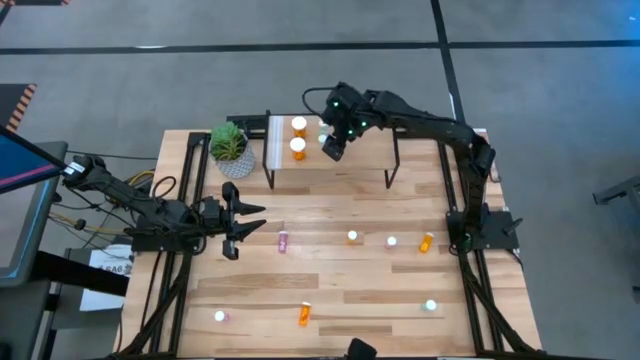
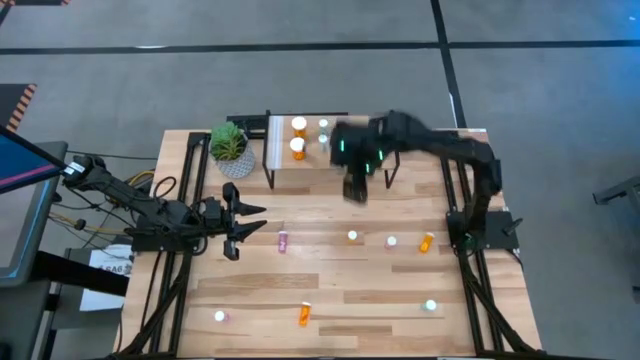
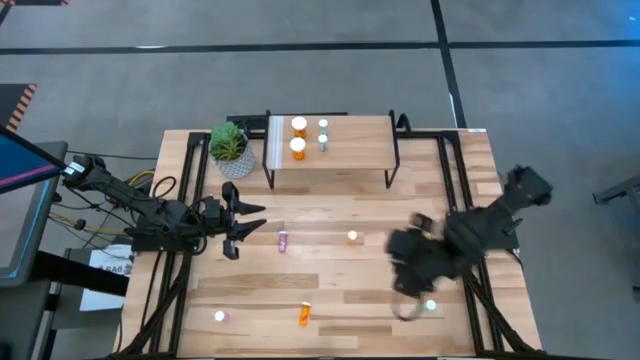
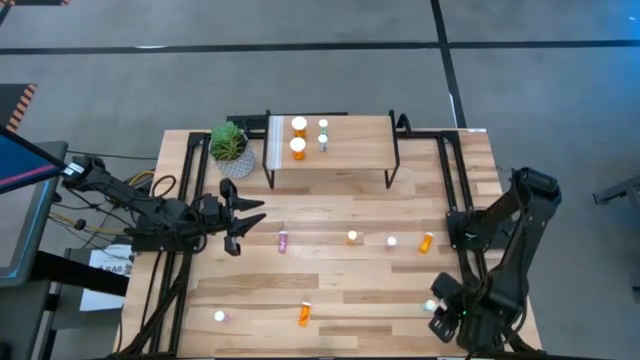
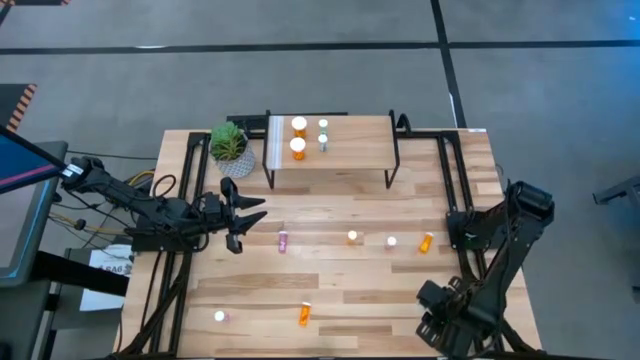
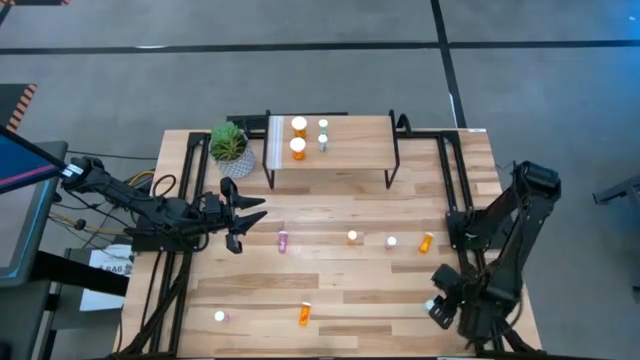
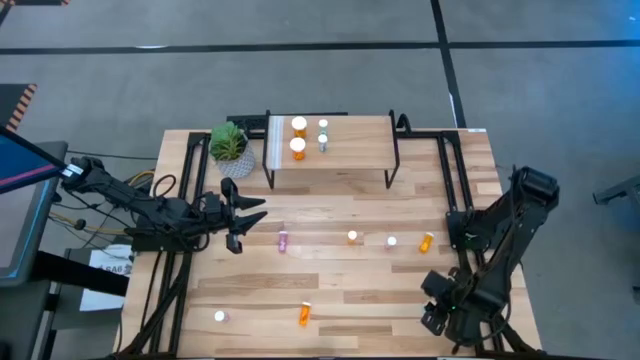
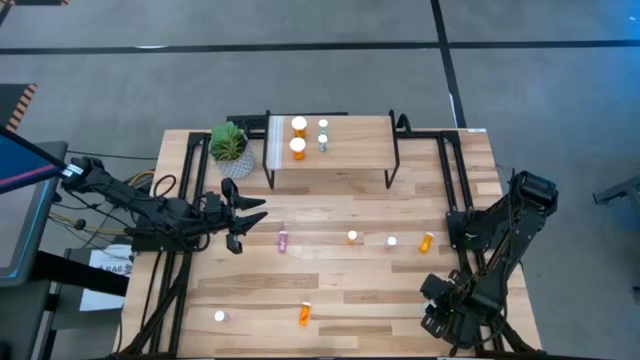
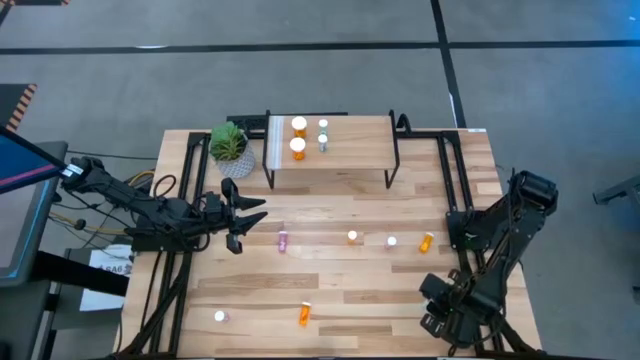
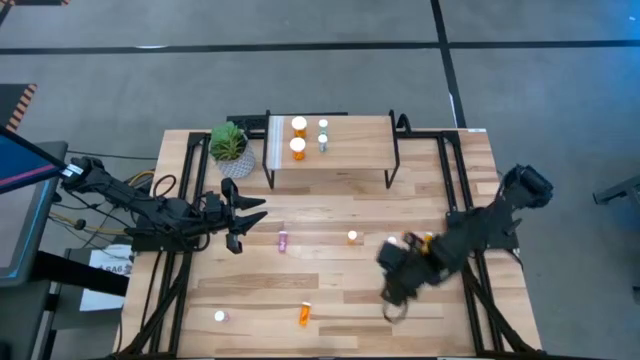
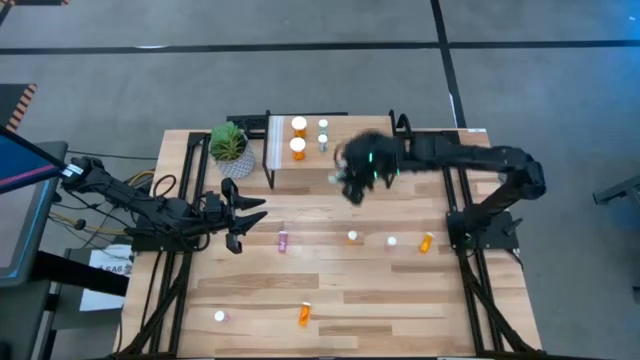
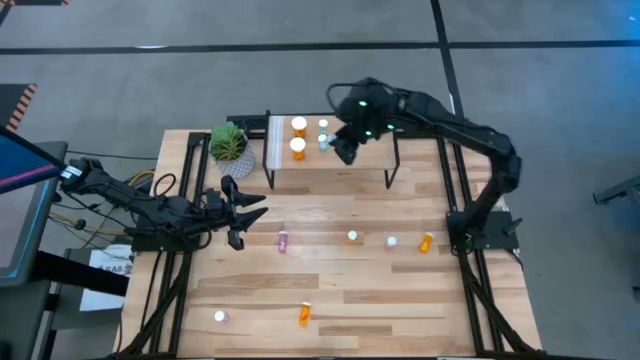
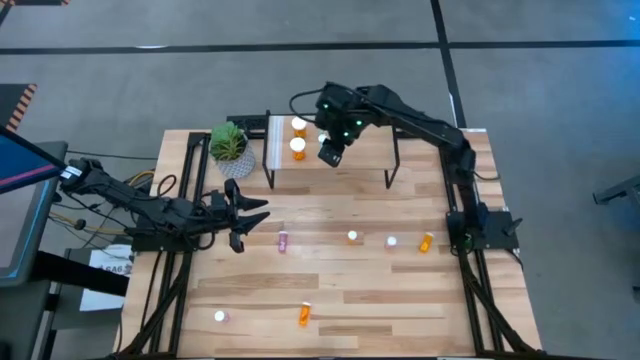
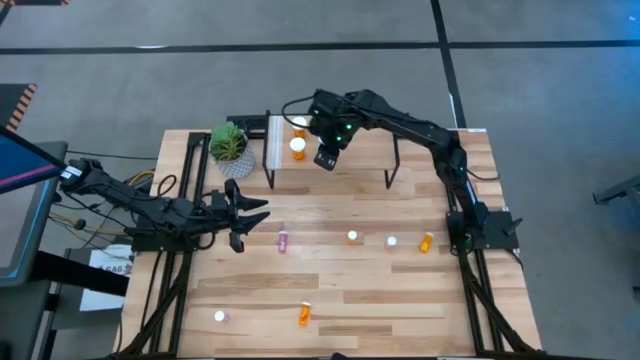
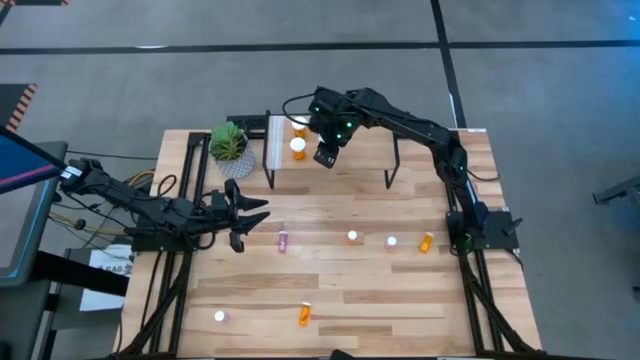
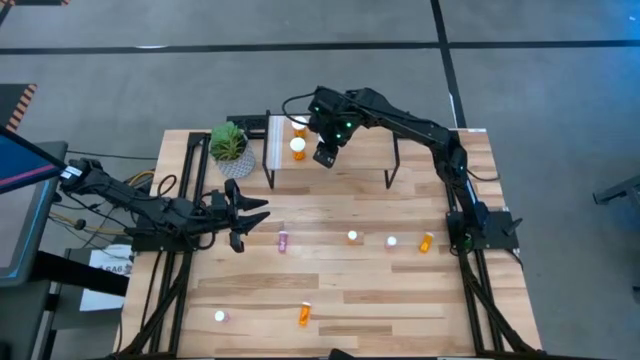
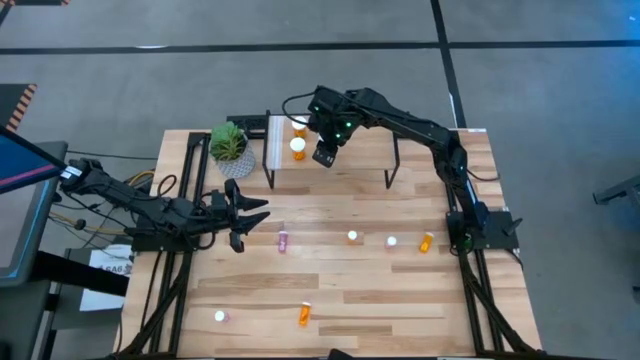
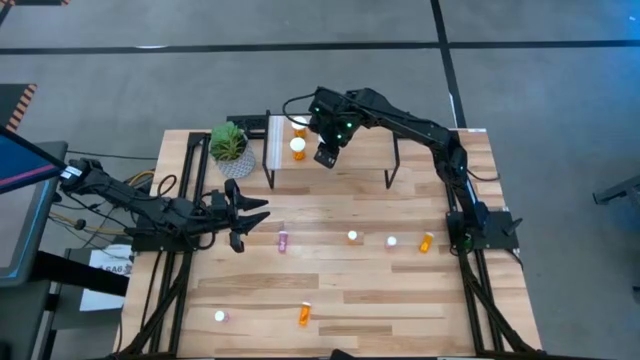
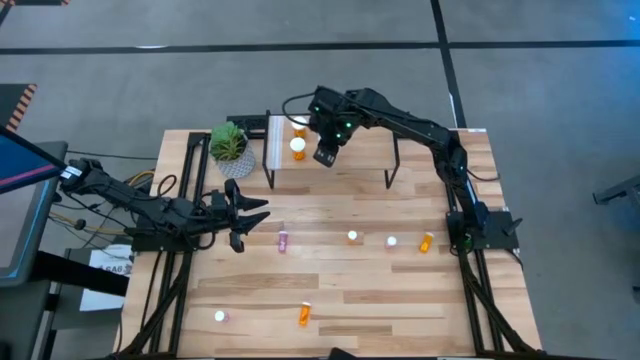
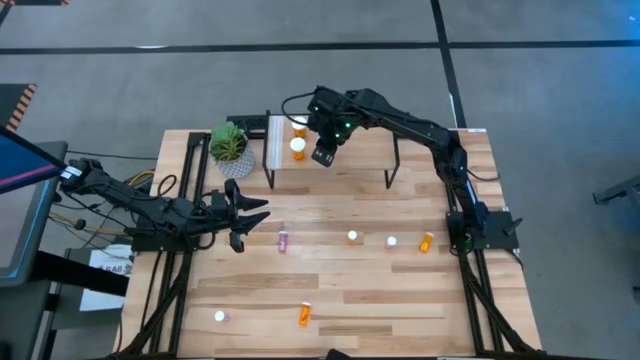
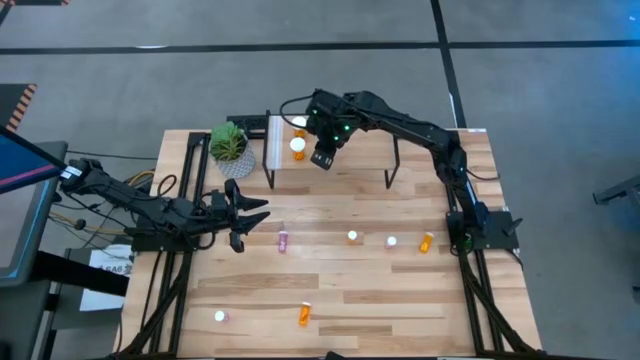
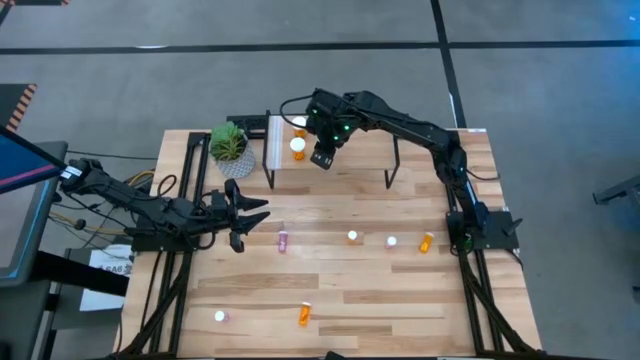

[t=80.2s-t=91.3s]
Task: Pick and place medicine bottles onto shelf by color
Put the blue pill bottle on the shelf aligned with the other blue pill bottles

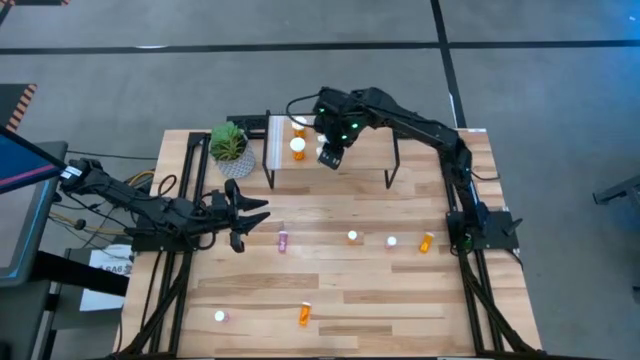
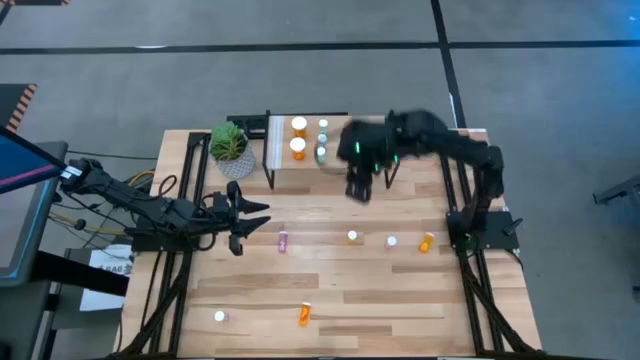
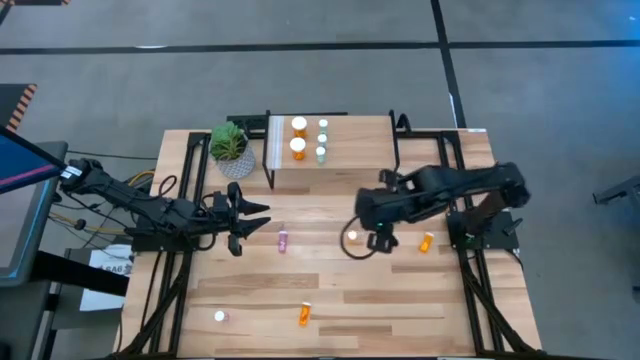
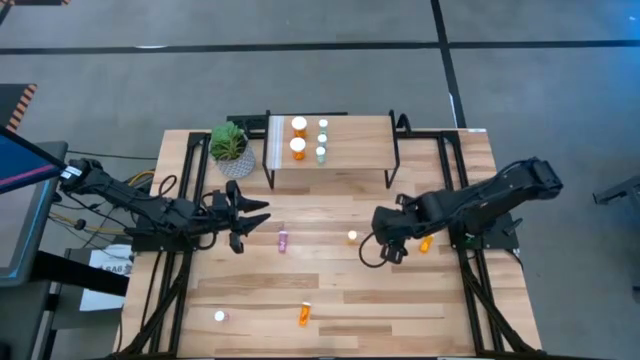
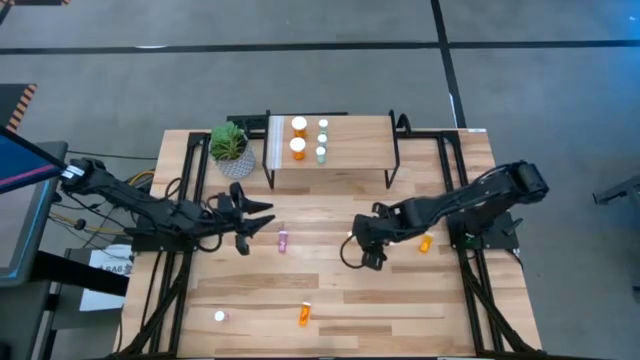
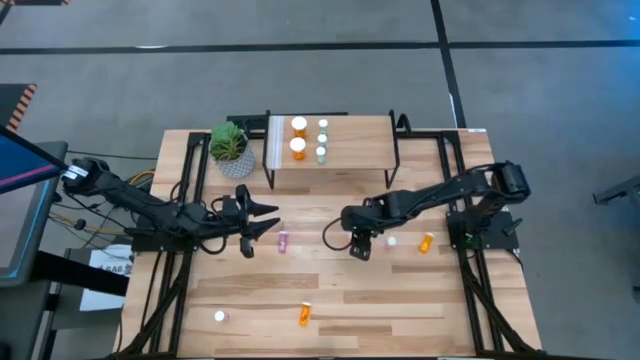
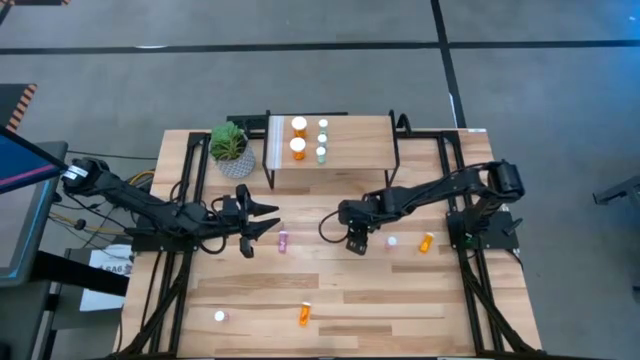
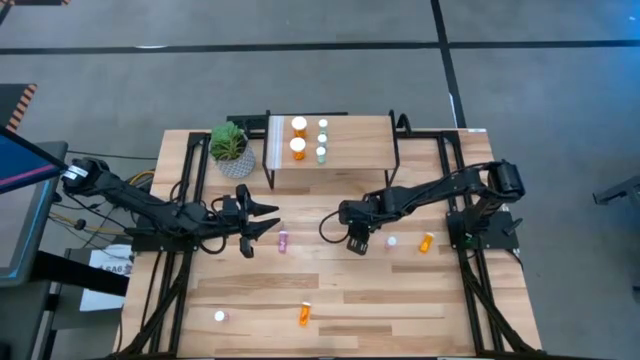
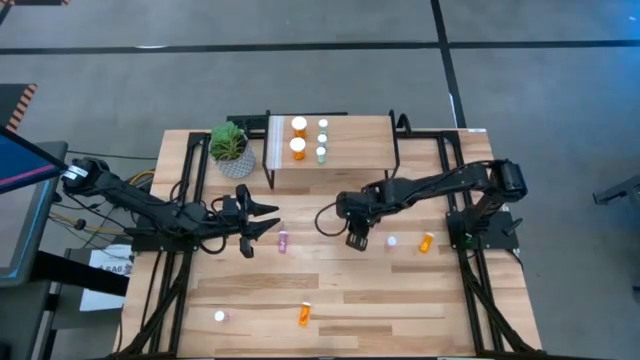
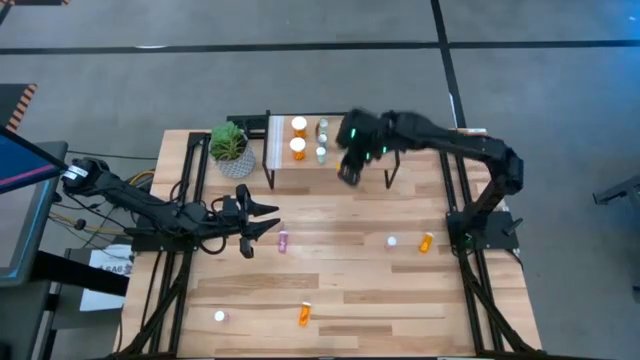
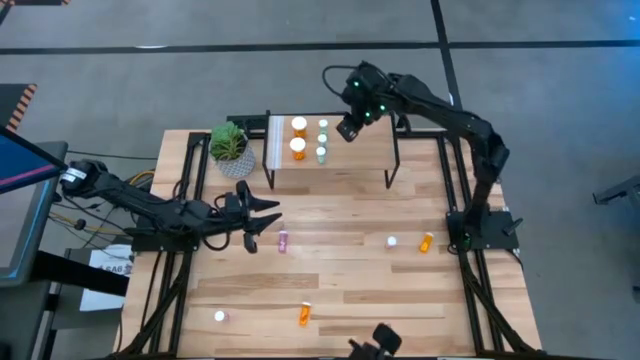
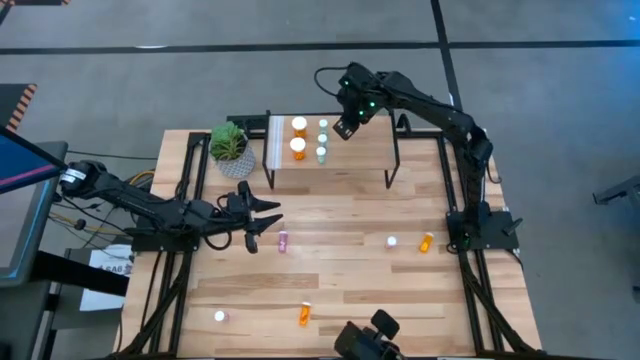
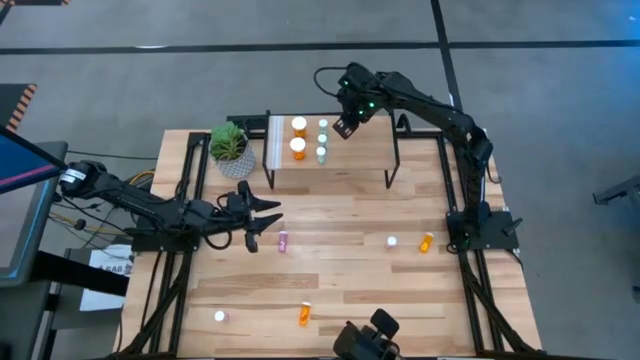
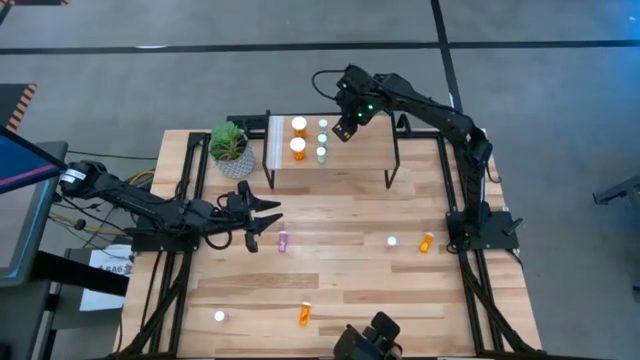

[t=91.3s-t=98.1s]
Put the small orange pill bottle on the shelf

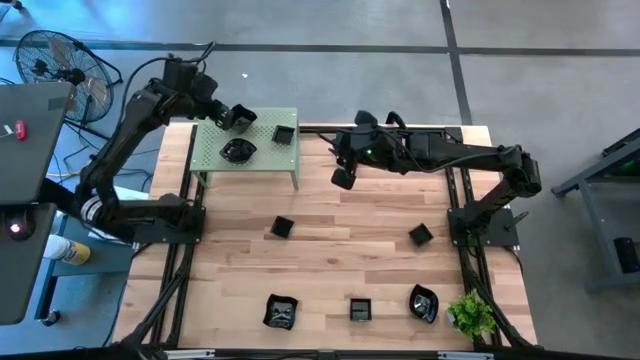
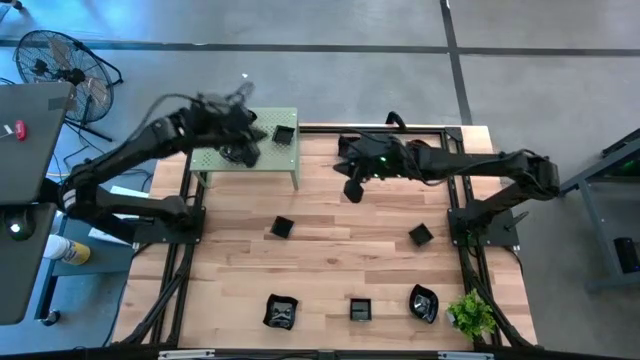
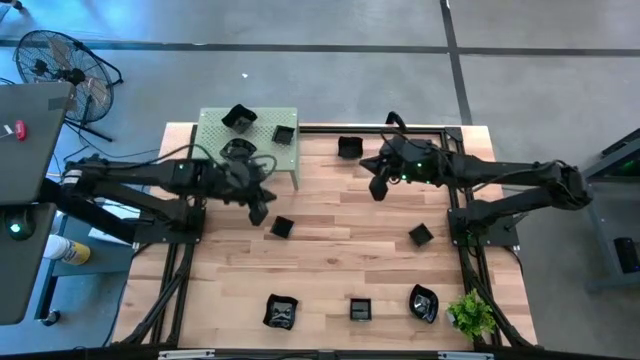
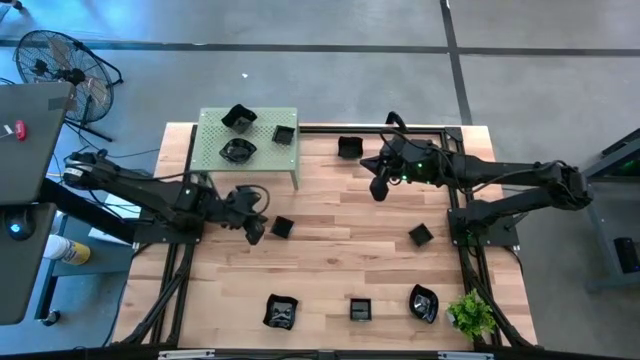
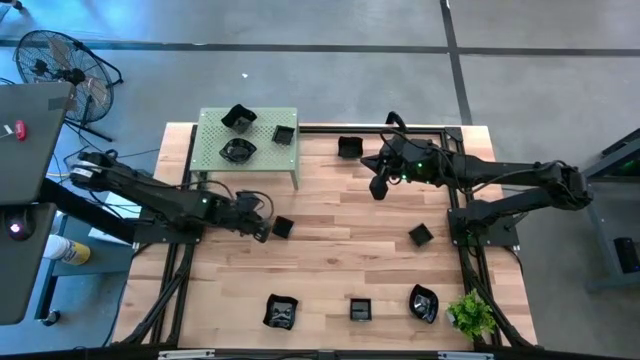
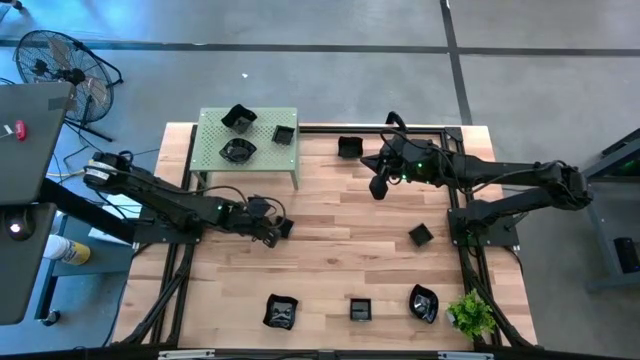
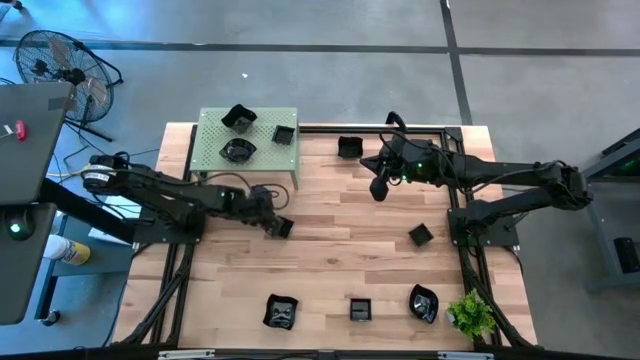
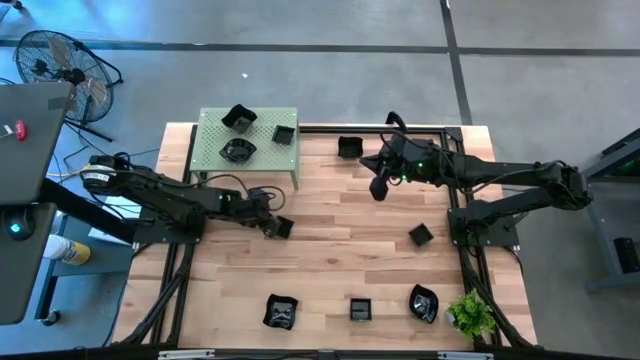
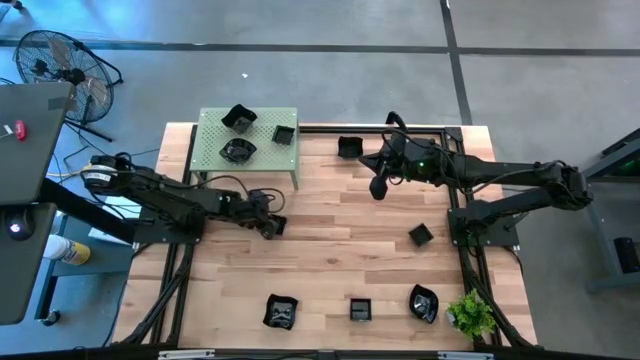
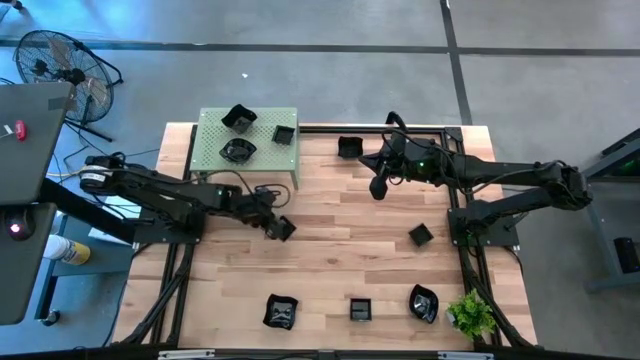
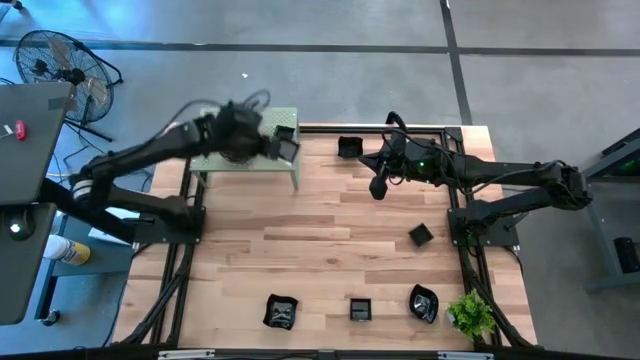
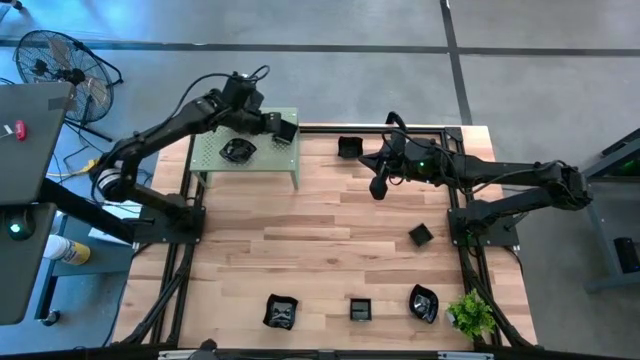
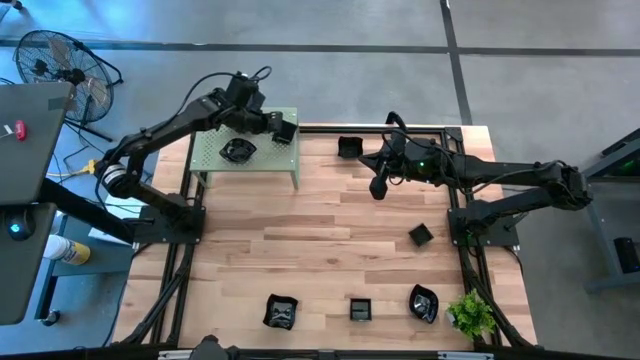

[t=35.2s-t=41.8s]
Task: Pick & Place Mini shaped plates
Stack the black square plate on top of the black square plate on the shelf
